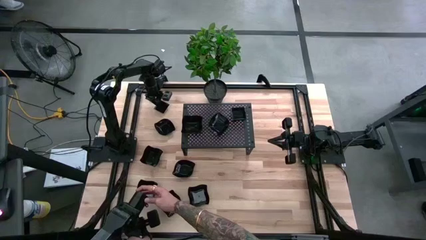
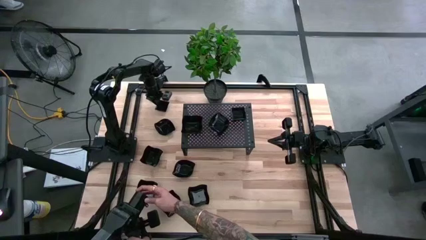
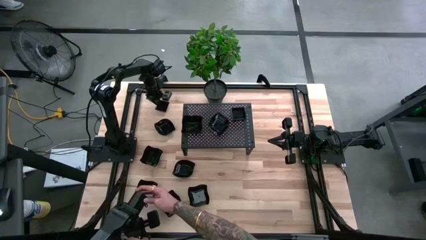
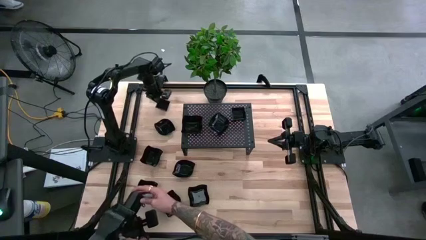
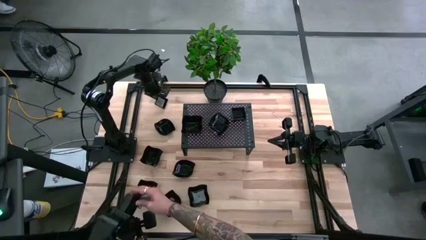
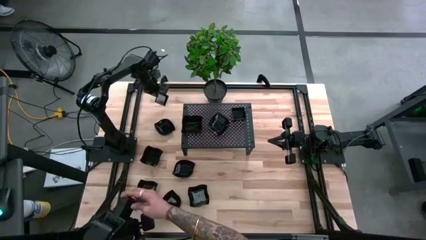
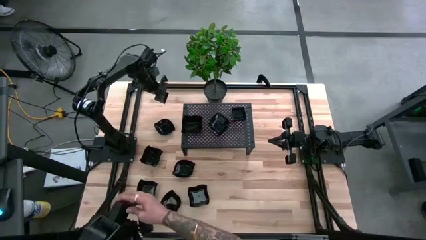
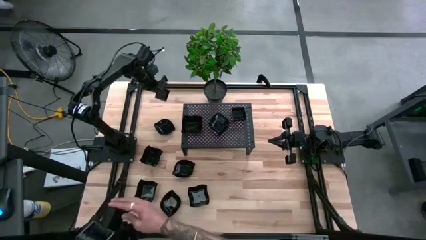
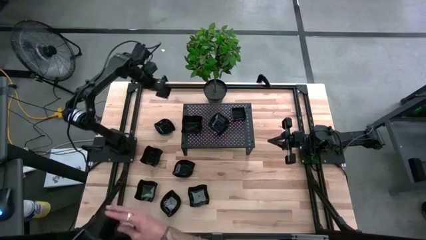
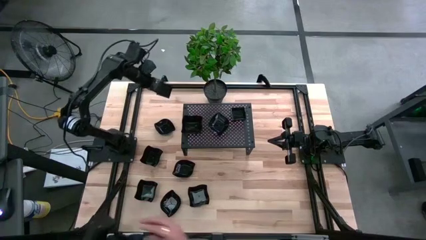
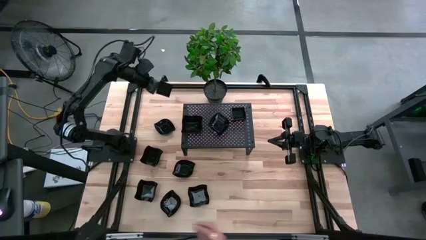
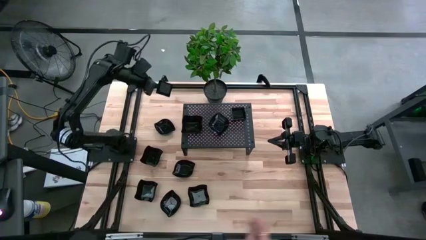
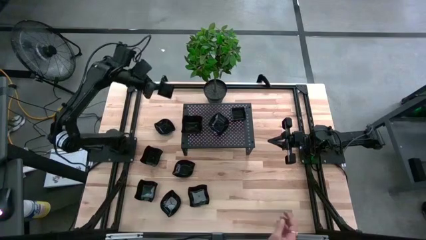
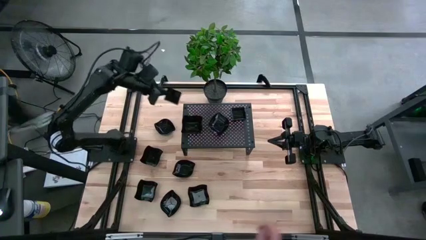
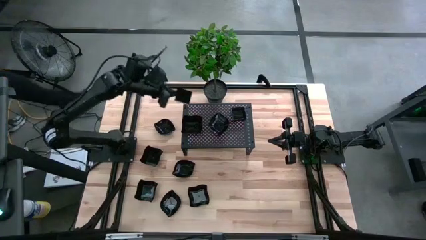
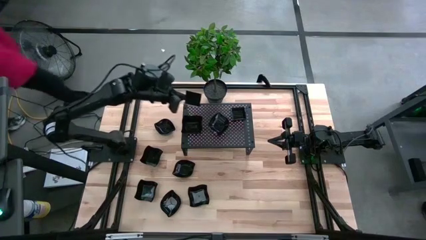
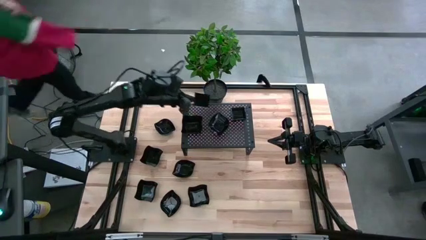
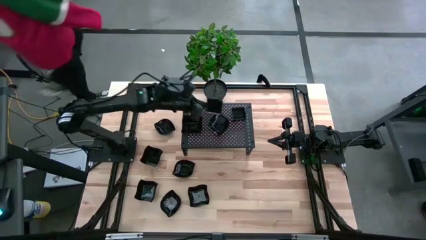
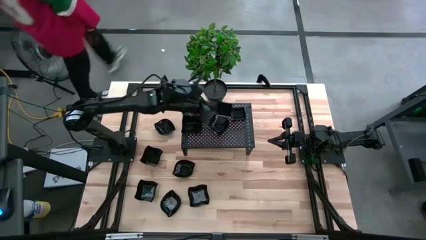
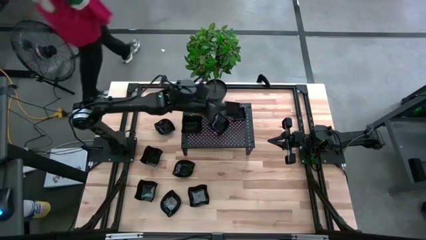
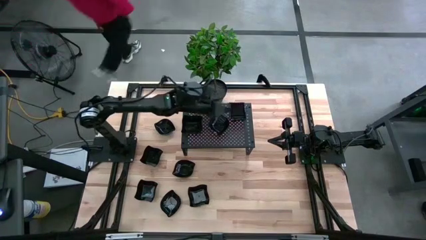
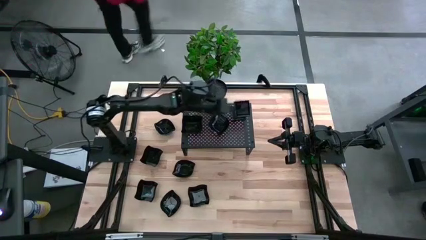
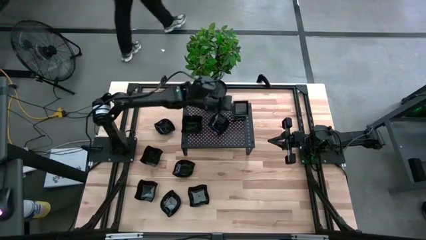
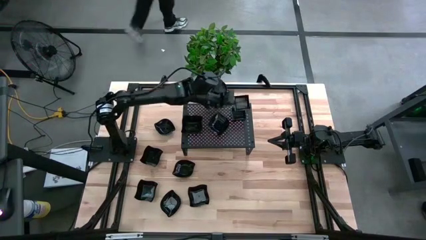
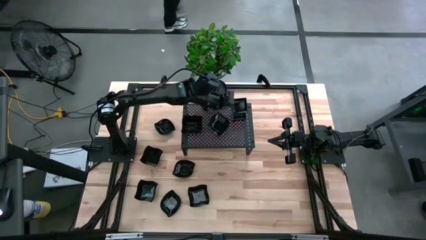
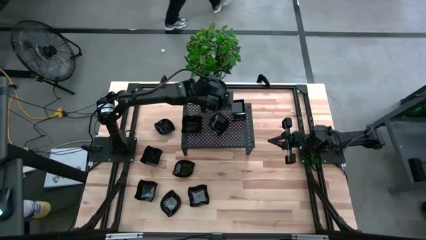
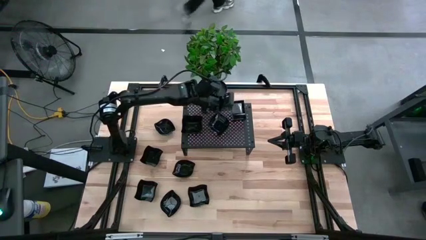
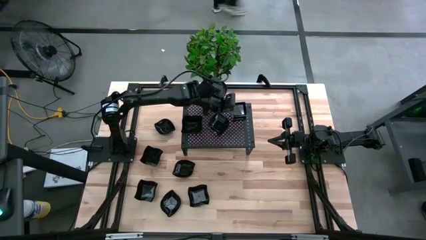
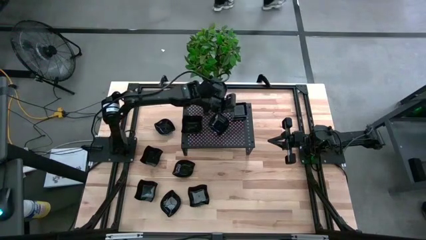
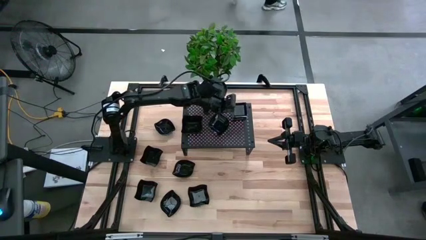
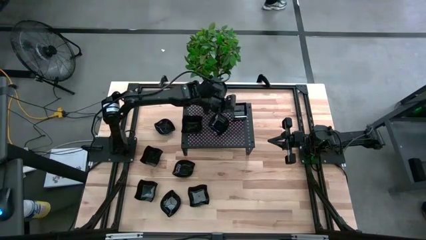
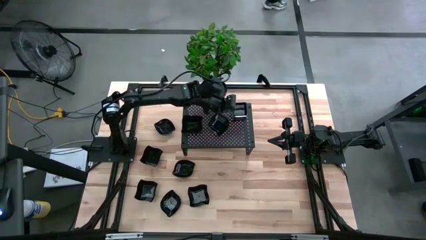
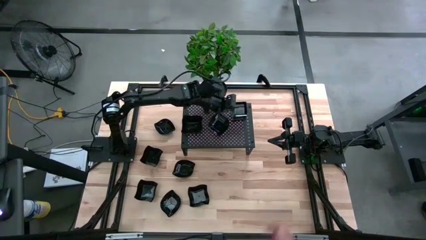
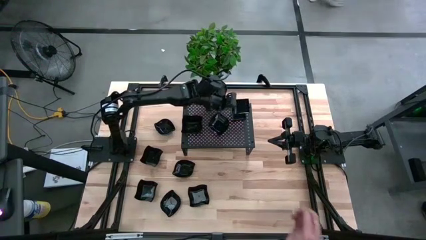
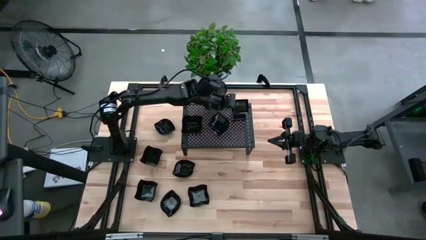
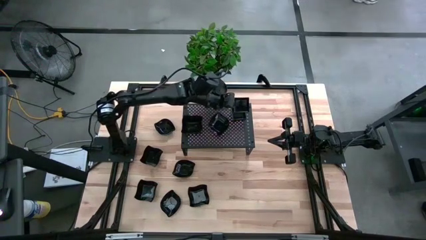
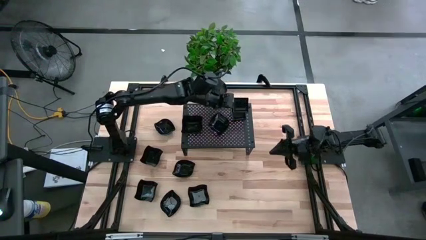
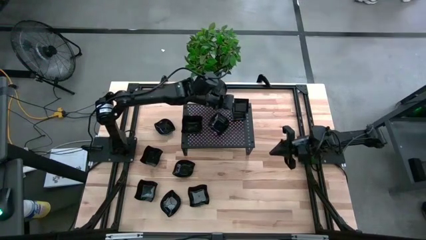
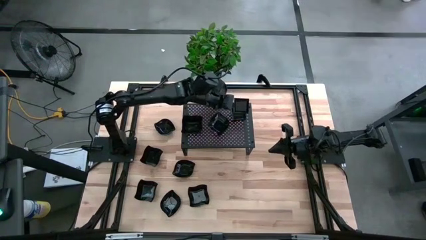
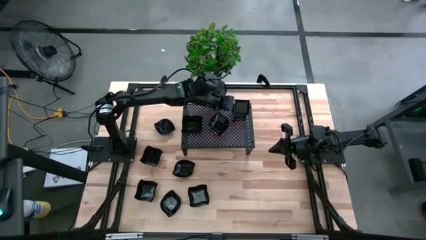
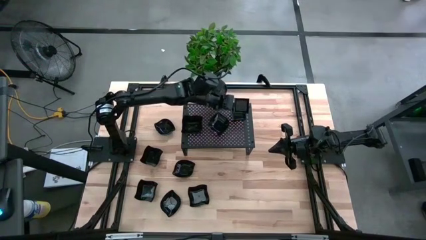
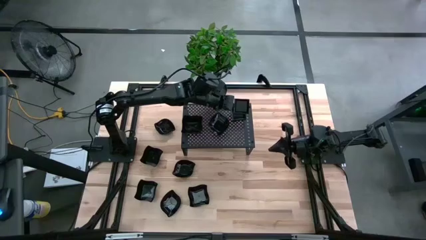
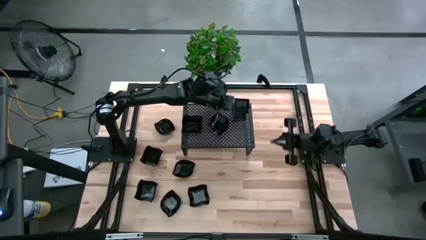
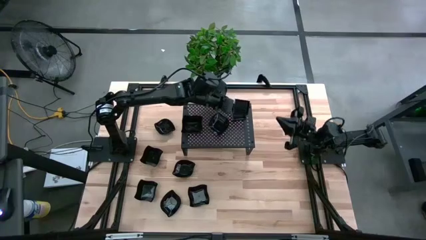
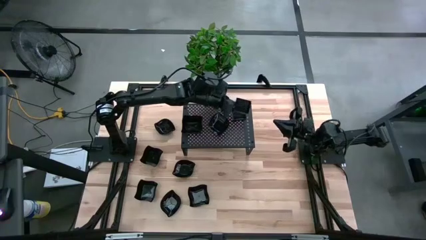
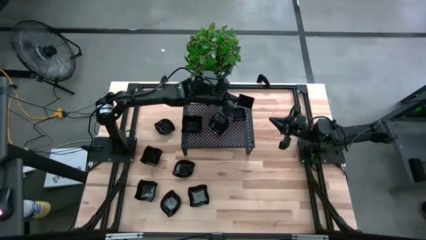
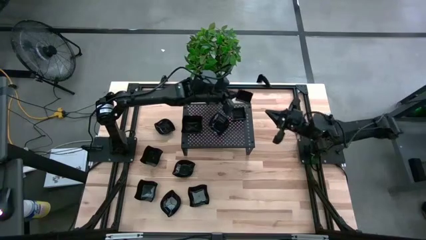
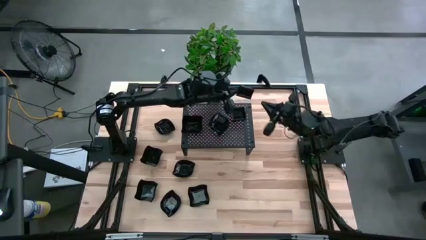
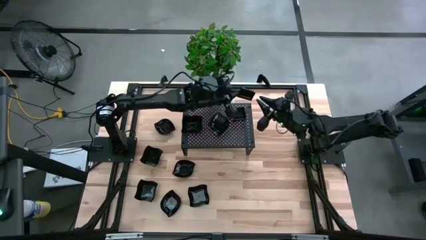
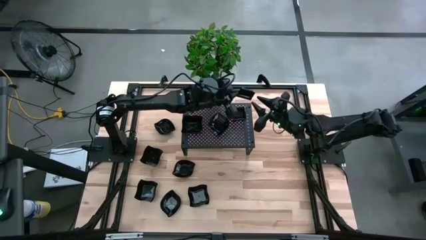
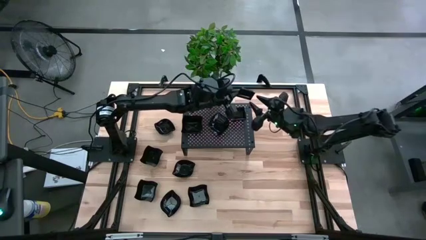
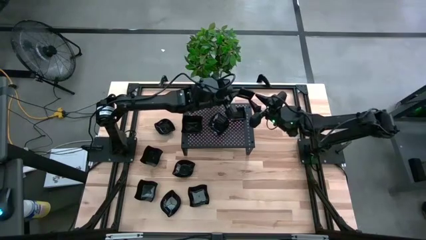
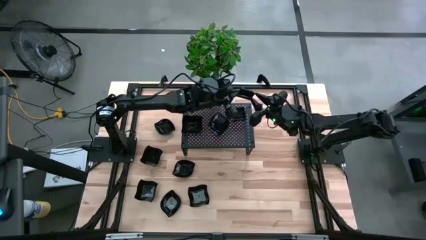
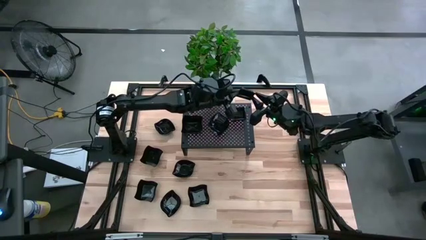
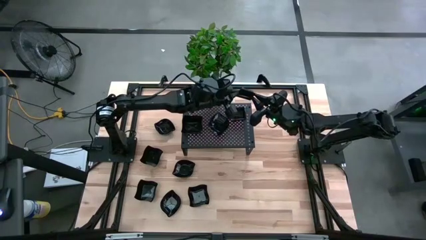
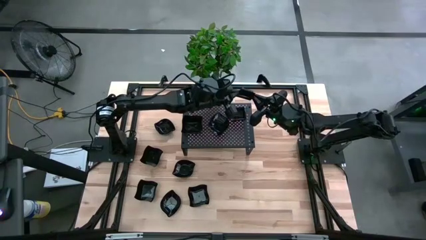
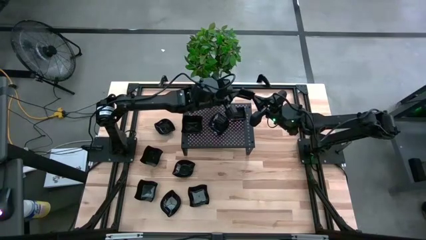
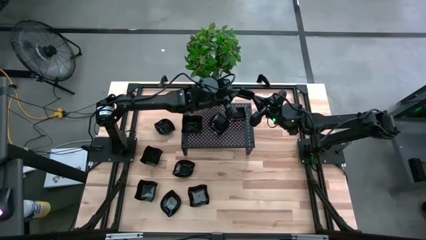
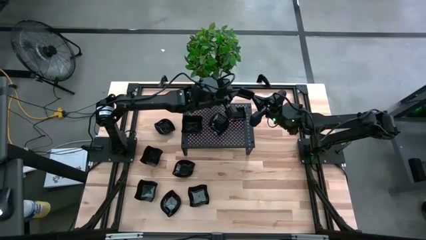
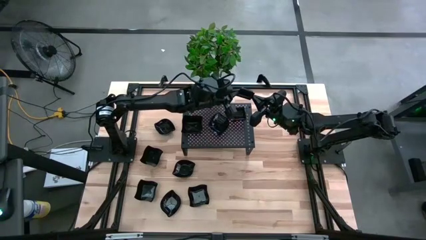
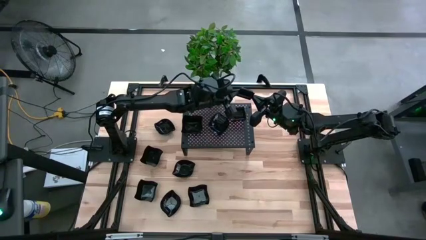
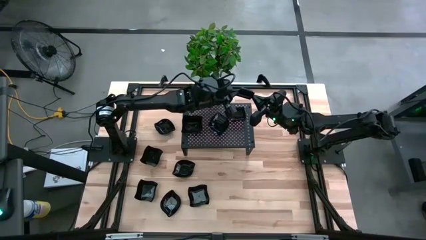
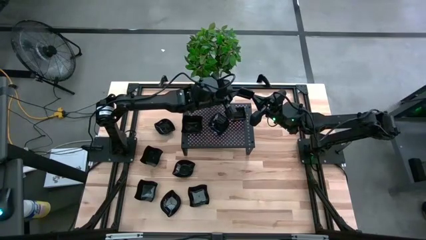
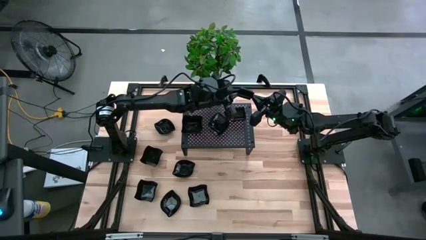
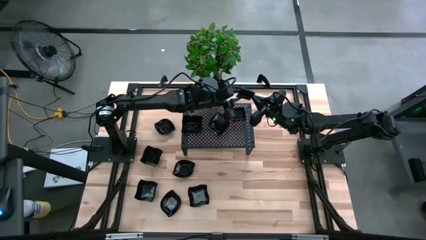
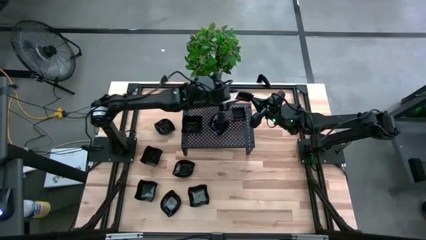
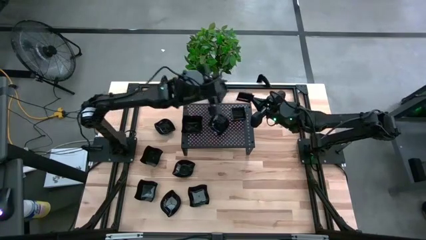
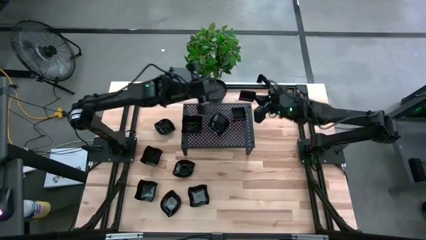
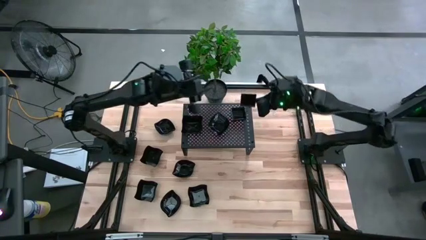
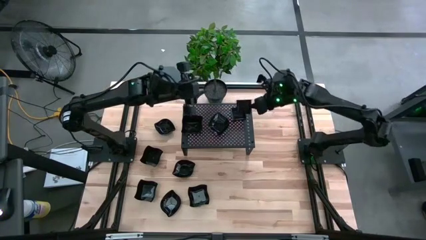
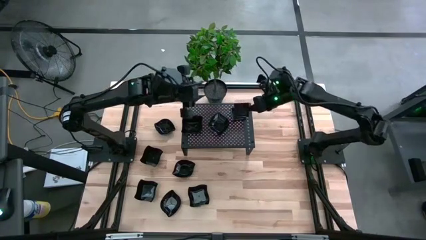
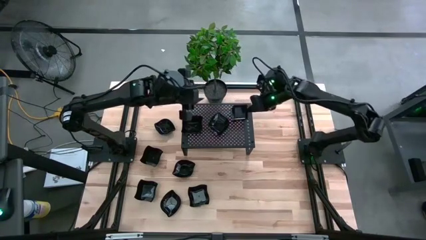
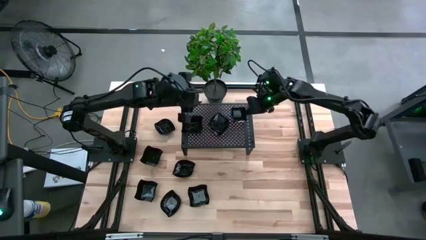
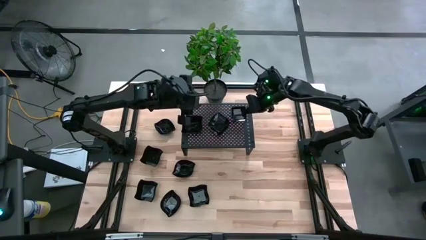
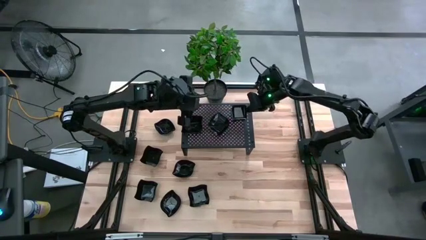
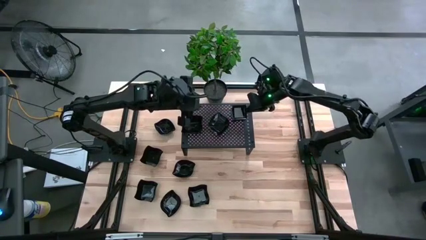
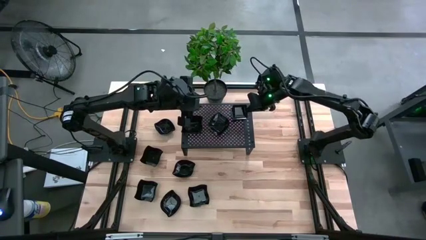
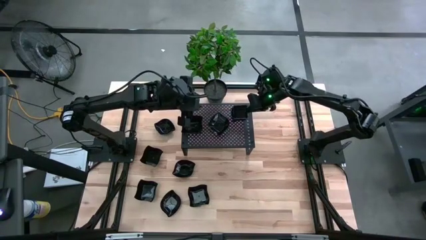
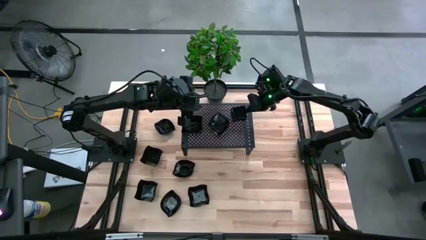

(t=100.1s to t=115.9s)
Task: Pick & Place Mini shaped plates
Stack the black square plate on top of the other black square plates on the shelf
